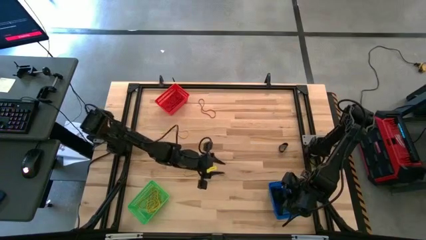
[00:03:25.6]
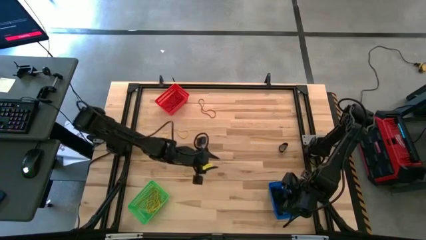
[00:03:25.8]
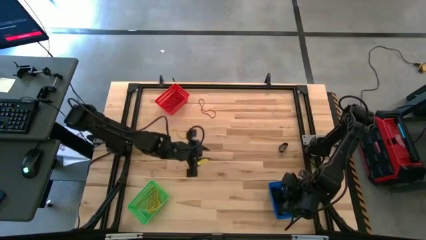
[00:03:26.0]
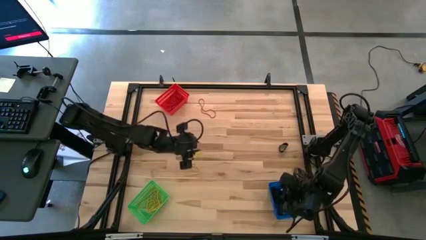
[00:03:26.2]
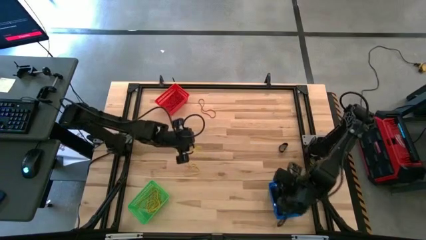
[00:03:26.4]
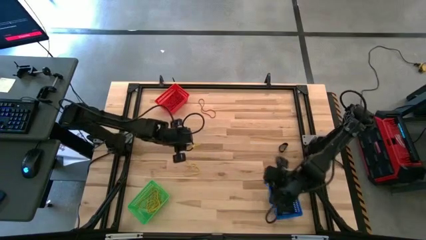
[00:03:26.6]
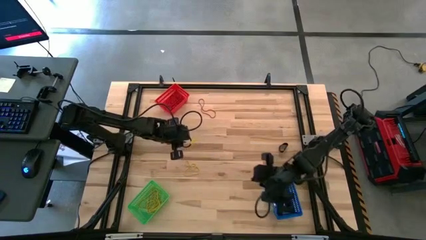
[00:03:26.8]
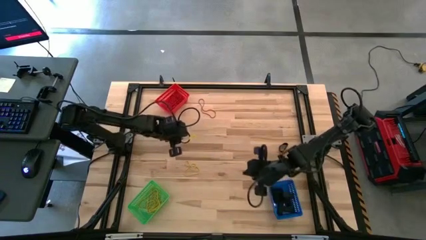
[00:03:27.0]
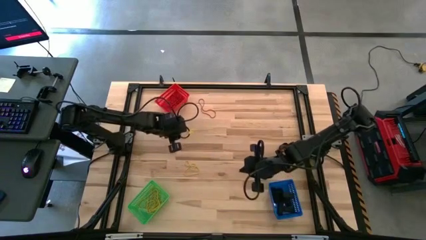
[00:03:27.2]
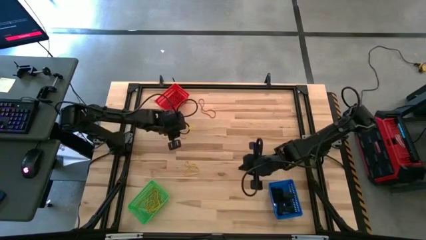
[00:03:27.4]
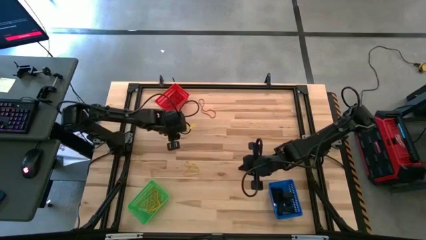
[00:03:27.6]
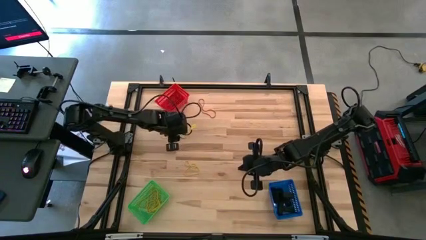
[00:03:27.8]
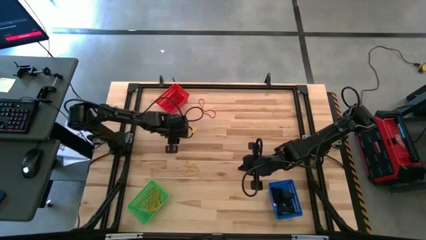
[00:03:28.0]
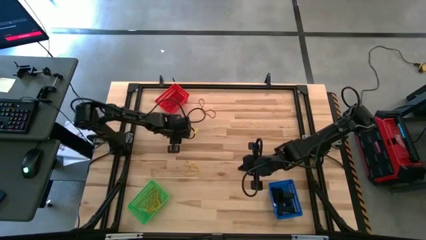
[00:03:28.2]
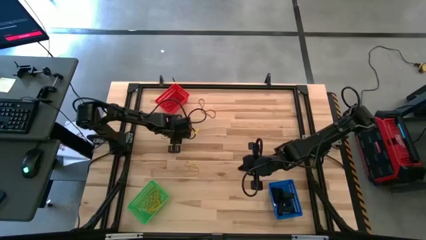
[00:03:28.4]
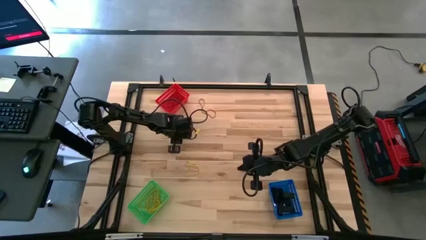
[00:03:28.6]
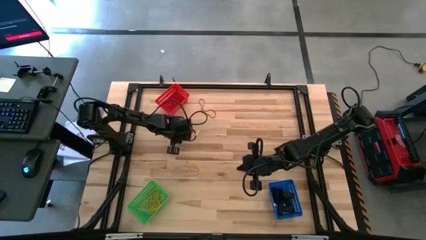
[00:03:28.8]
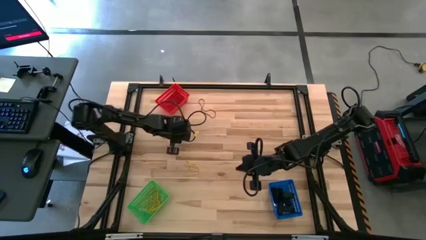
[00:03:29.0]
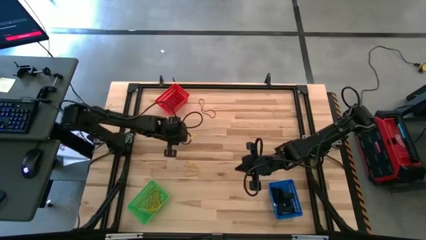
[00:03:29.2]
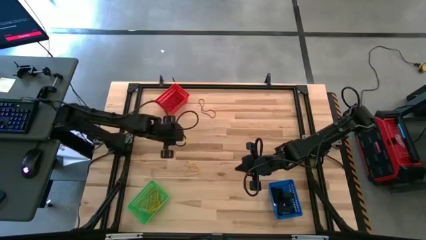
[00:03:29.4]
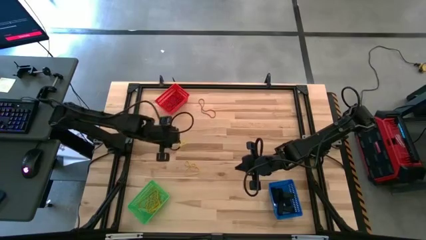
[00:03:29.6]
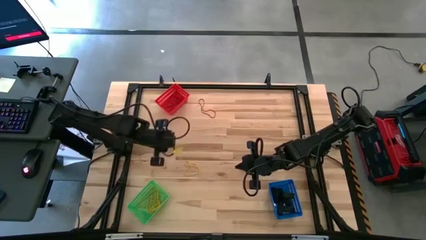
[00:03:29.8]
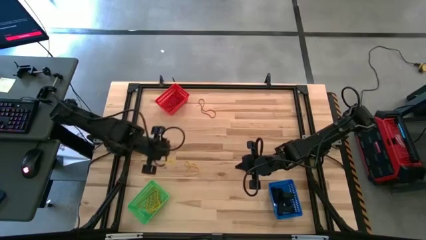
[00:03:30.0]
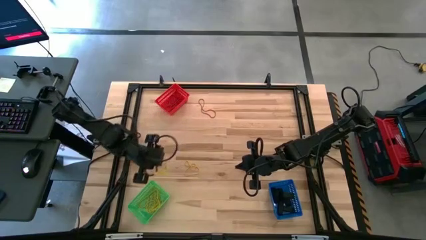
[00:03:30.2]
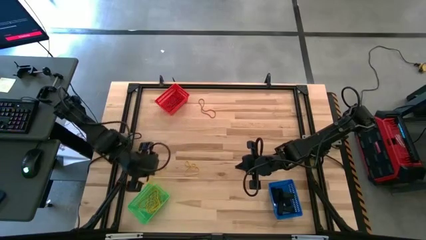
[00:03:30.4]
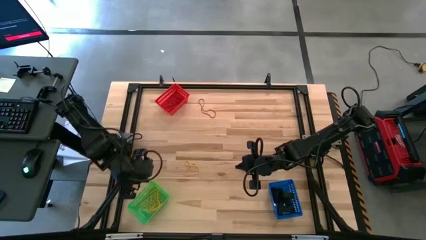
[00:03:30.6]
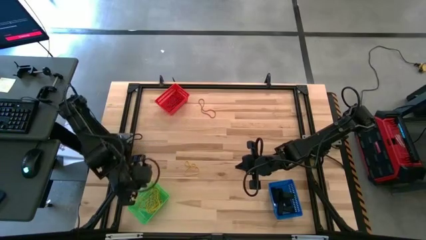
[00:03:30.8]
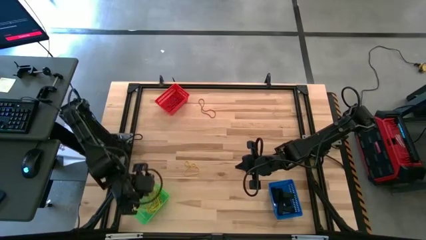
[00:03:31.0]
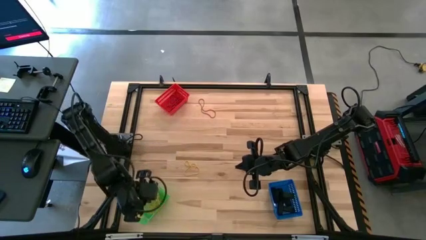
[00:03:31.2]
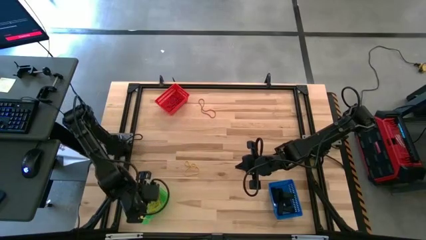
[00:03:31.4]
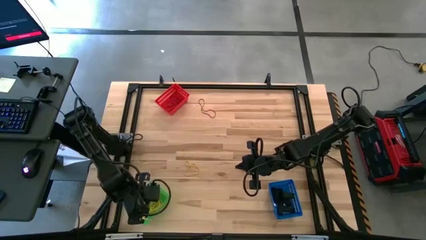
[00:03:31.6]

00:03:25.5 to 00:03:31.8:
Task: Sort rubber bands into baskets
Put the yellow rubber band into the green basket

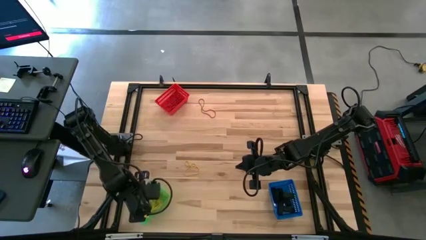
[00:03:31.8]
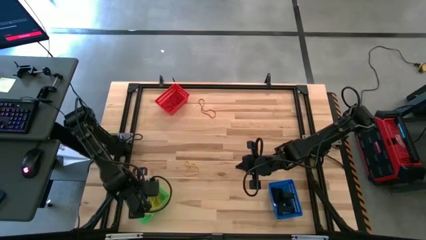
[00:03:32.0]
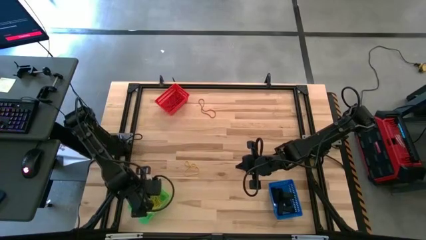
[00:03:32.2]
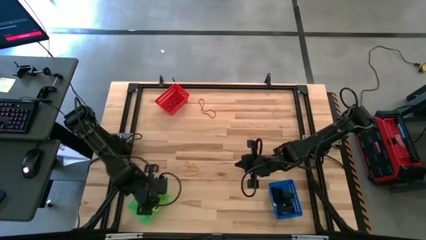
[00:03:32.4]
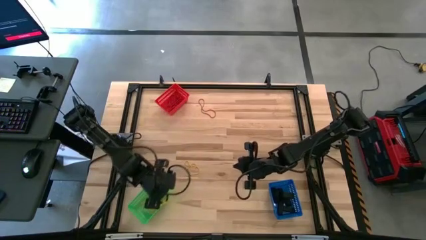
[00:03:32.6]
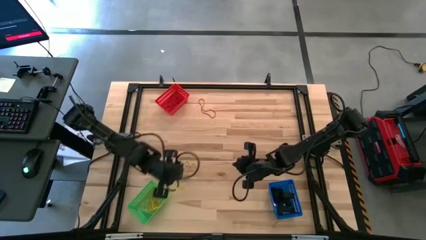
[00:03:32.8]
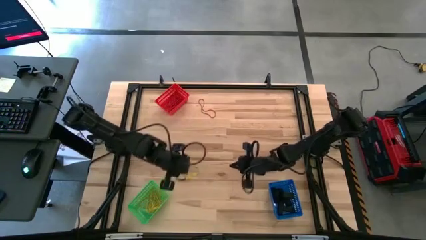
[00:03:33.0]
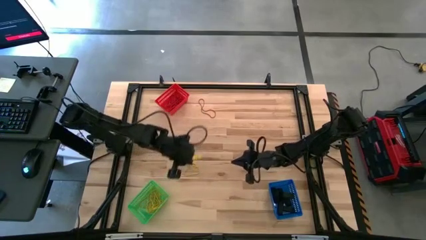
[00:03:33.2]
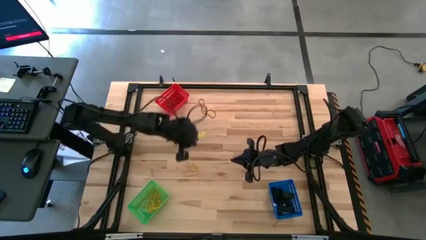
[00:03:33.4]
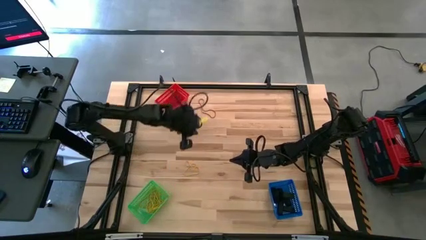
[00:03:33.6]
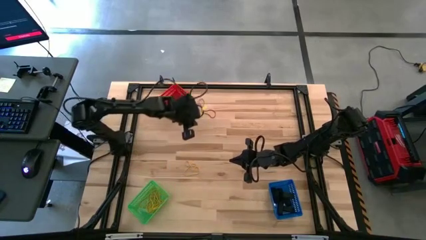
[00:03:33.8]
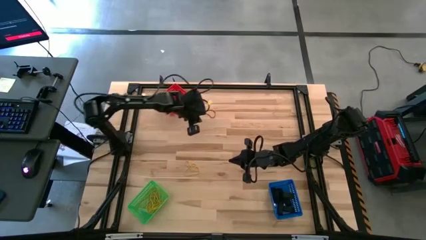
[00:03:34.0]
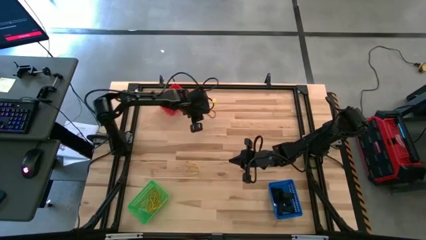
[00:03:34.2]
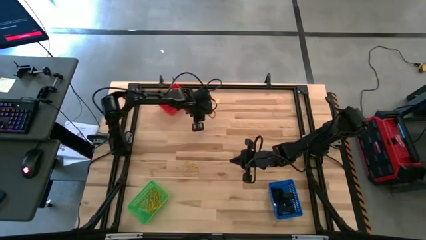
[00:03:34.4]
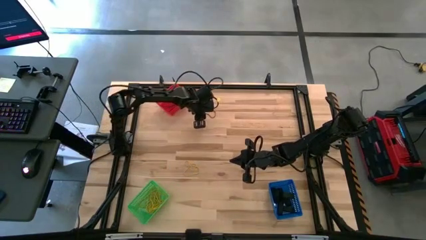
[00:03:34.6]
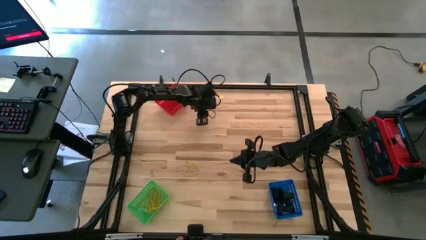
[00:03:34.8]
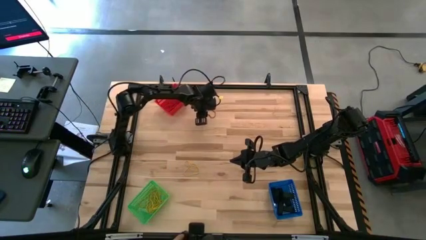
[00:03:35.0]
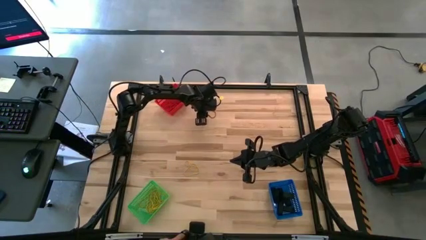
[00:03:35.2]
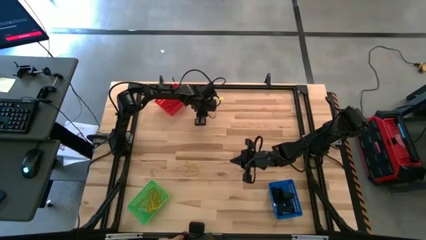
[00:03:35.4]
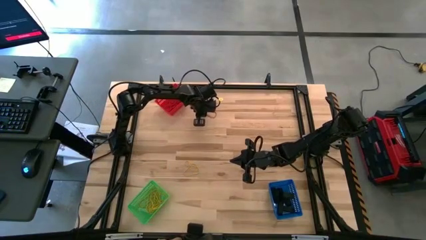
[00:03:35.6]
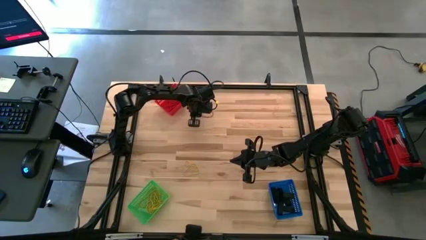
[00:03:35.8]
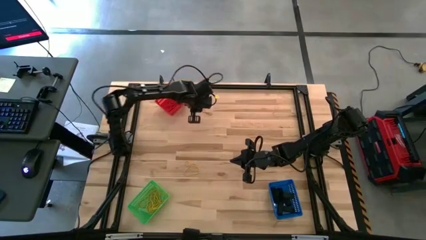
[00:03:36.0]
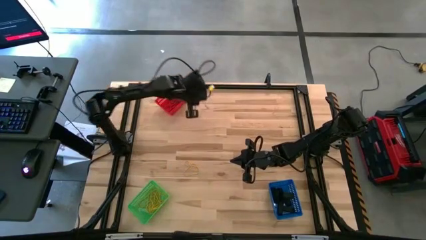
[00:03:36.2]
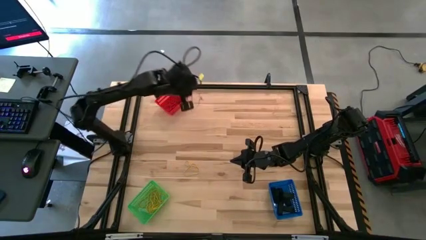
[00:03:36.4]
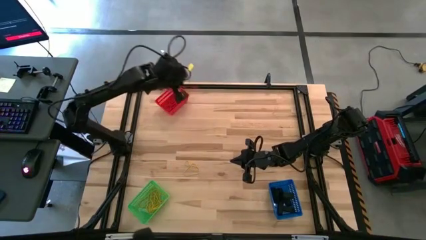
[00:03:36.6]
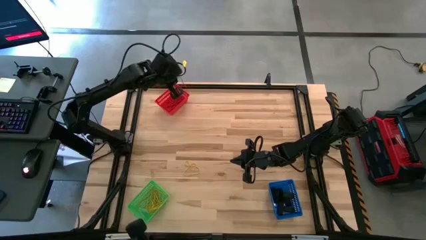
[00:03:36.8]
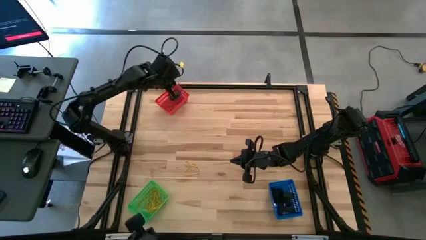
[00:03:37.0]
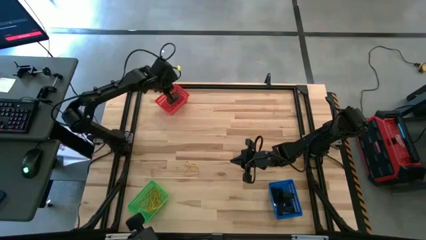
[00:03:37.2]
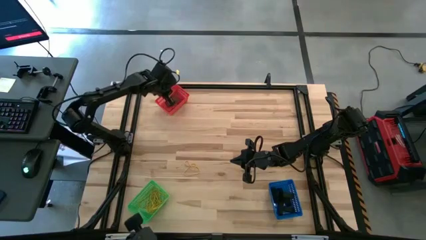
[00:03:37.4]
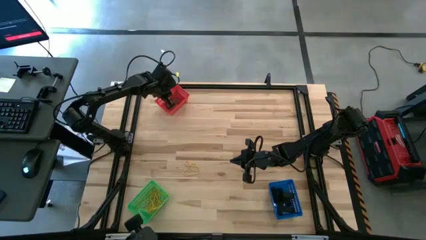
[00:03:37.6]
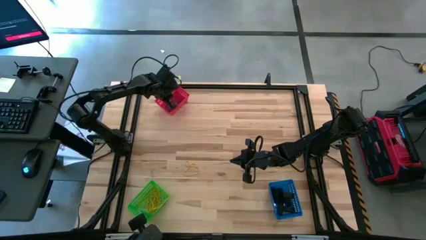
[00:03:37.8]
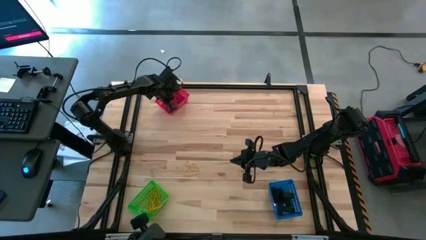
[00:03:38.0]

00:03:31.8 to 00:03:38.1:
Put the red rubber band into the red basket

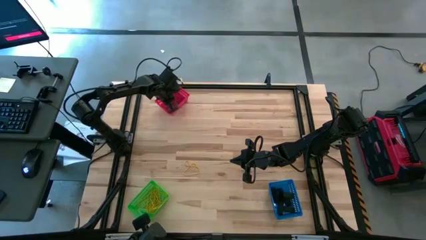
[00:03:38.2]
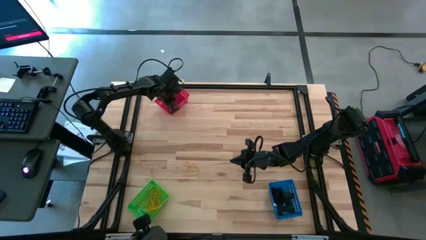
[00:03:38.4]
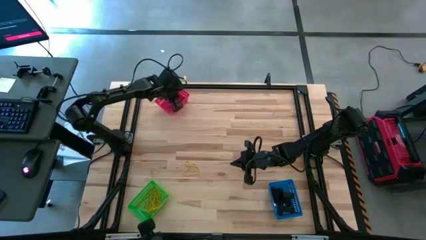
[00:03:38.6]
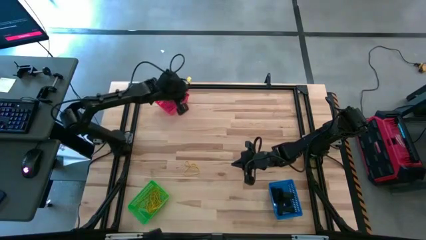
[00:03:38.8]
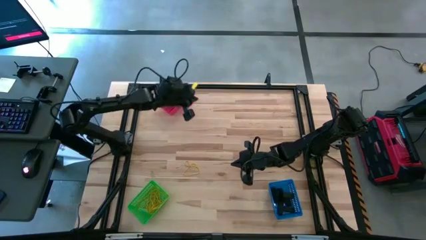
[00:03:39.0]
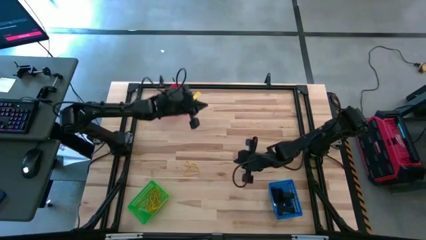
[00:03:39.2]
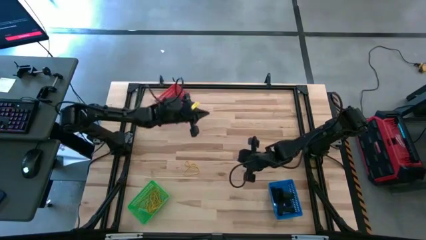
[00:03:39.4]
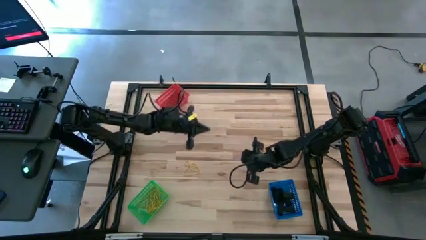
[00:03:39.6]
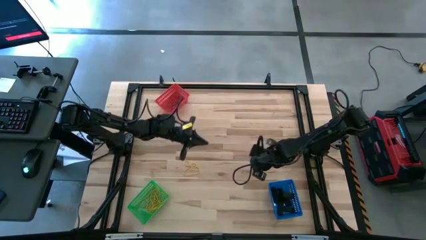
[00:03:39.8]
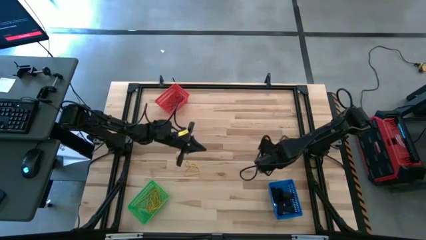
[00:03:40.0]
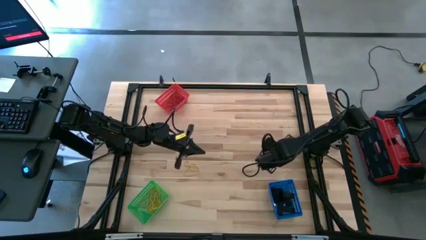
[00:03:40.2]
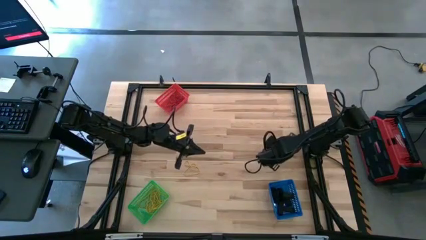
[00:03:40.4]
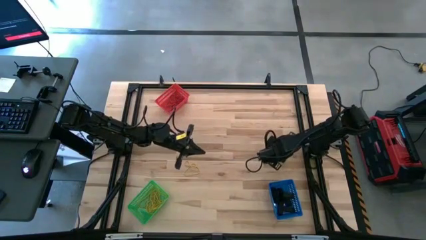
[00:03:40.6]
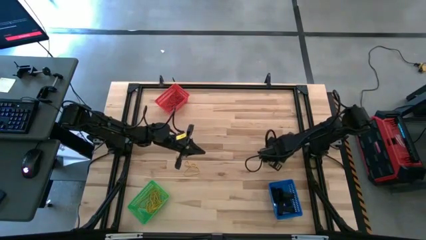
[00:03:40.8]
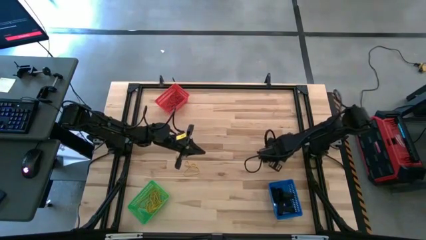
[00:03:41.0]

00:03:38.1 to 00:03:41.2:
Put the black rubber band into the blue basket
